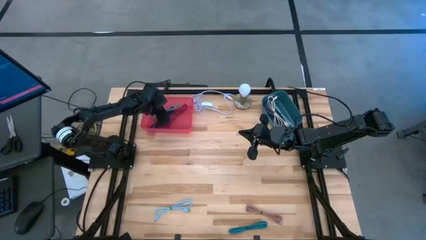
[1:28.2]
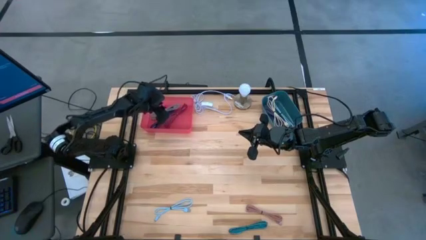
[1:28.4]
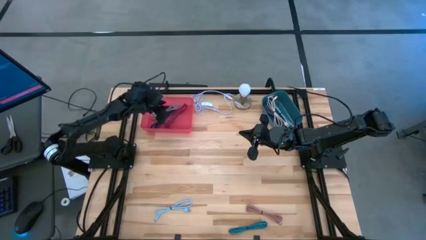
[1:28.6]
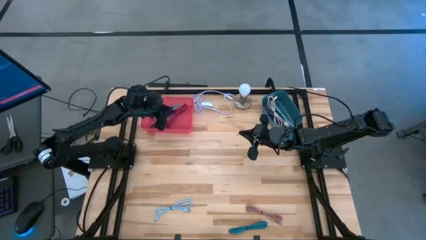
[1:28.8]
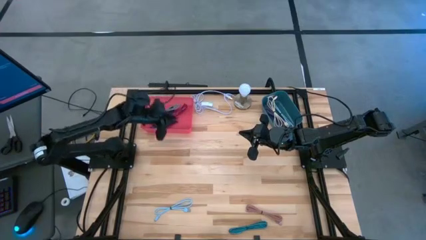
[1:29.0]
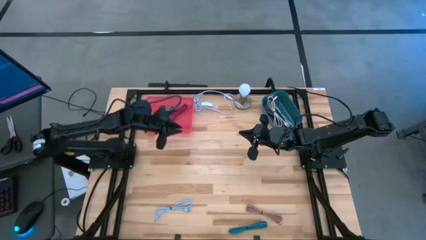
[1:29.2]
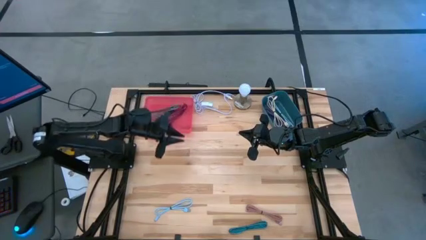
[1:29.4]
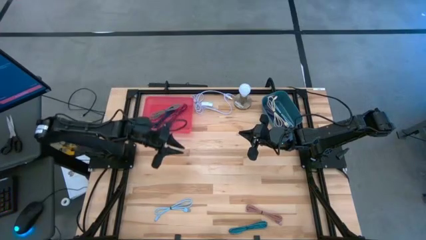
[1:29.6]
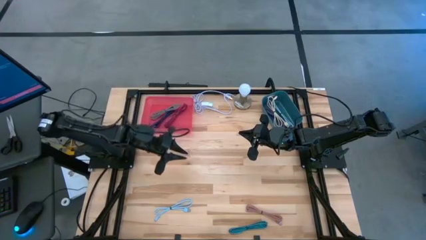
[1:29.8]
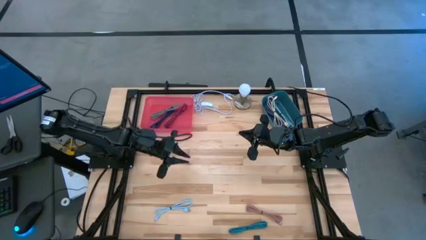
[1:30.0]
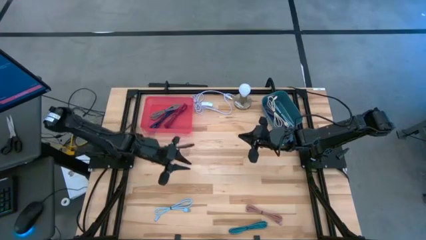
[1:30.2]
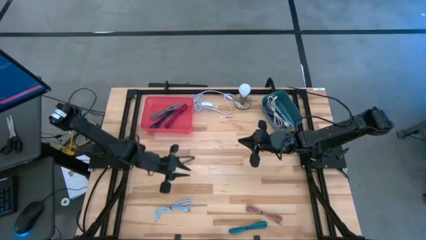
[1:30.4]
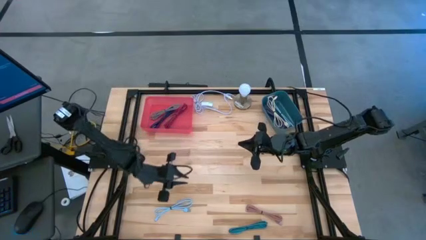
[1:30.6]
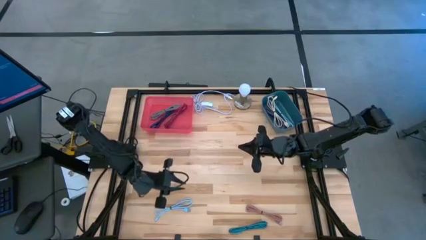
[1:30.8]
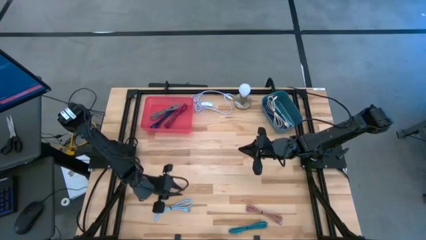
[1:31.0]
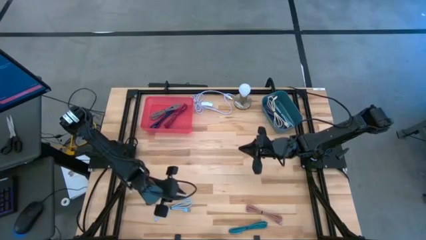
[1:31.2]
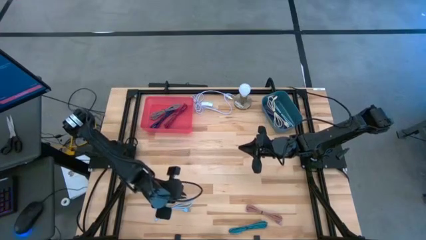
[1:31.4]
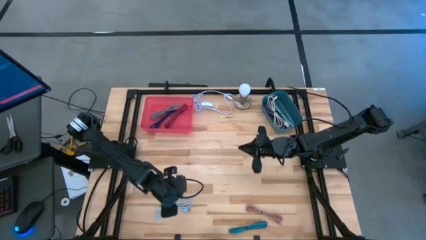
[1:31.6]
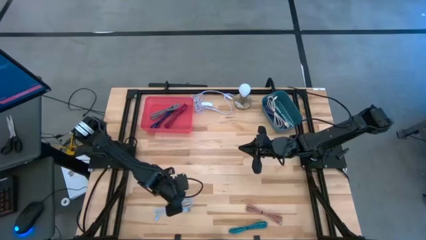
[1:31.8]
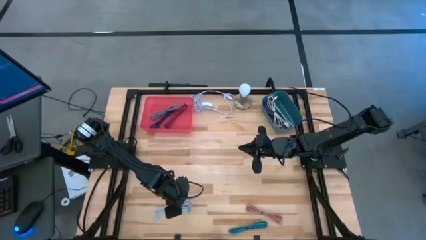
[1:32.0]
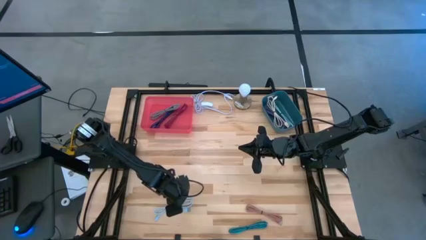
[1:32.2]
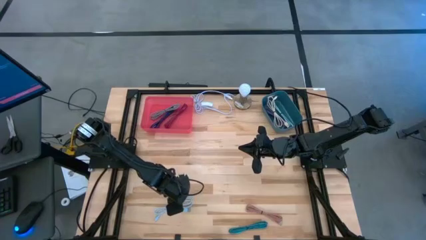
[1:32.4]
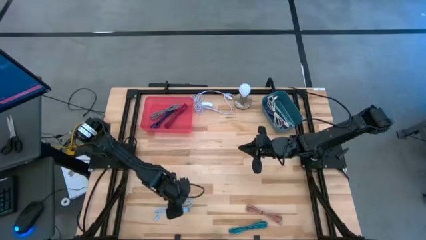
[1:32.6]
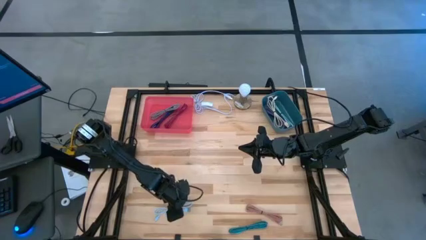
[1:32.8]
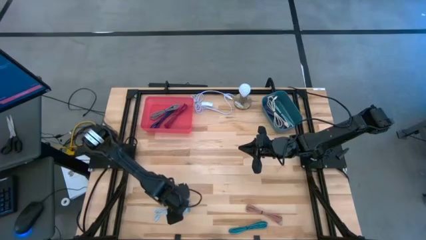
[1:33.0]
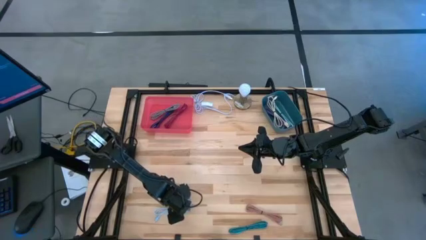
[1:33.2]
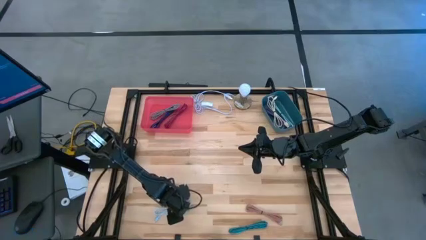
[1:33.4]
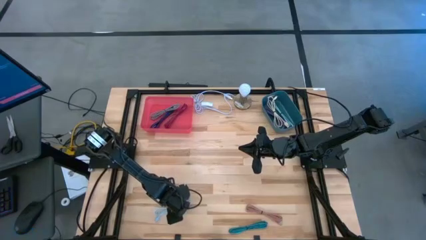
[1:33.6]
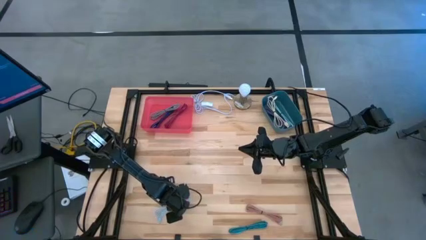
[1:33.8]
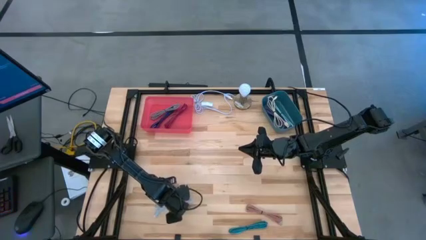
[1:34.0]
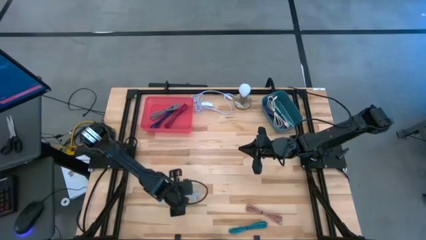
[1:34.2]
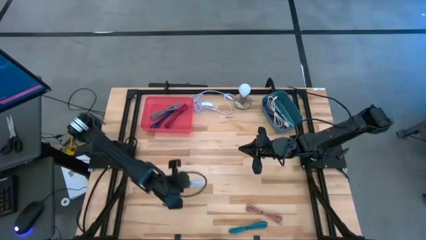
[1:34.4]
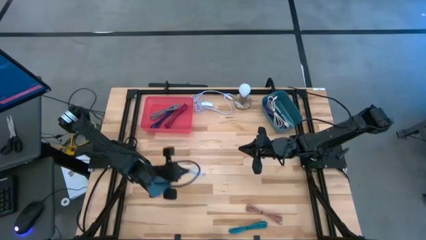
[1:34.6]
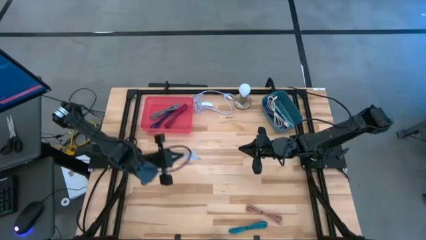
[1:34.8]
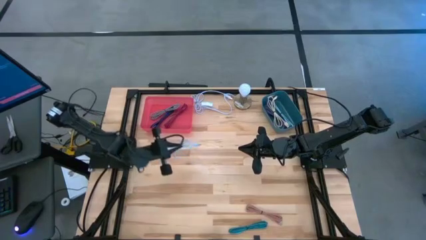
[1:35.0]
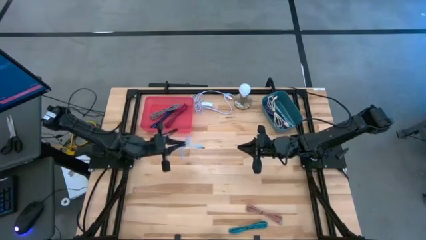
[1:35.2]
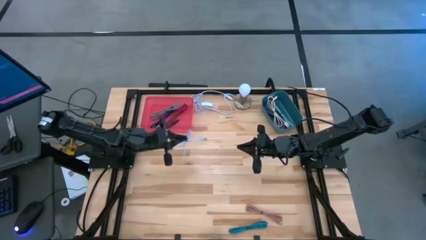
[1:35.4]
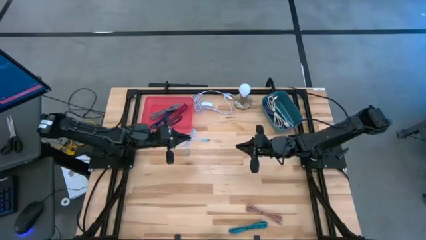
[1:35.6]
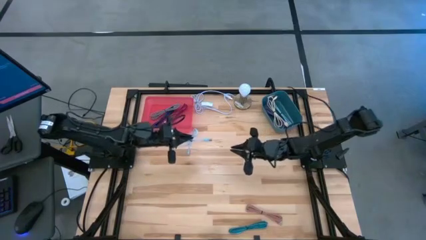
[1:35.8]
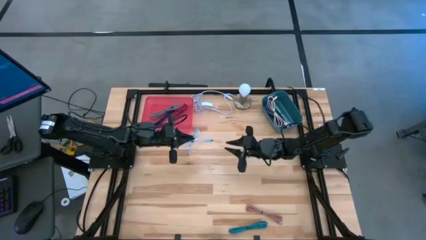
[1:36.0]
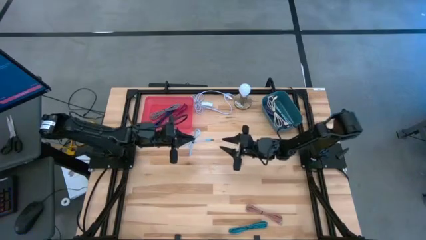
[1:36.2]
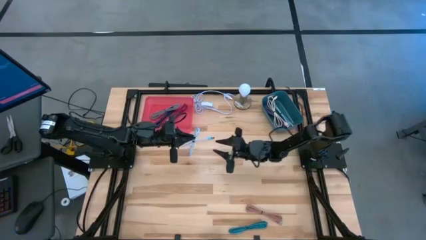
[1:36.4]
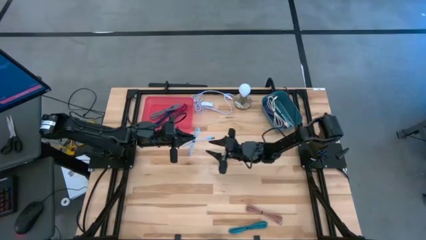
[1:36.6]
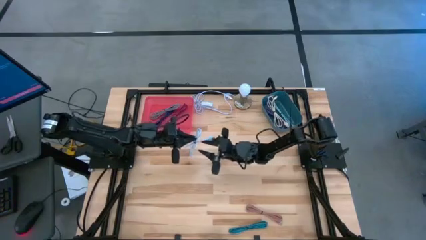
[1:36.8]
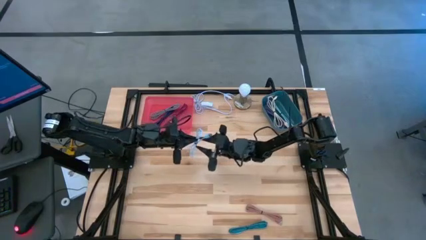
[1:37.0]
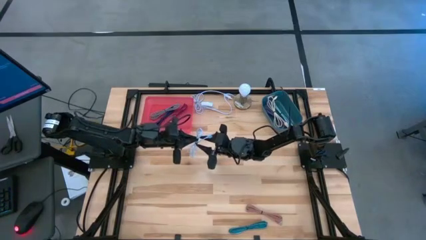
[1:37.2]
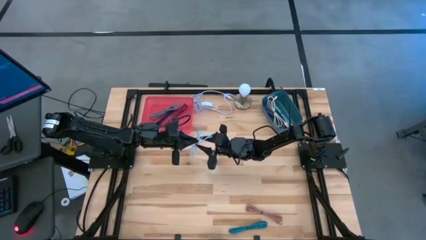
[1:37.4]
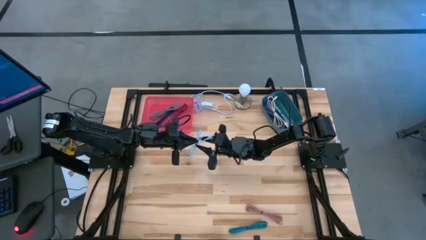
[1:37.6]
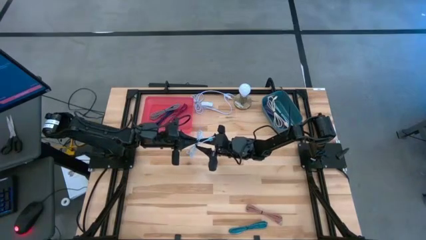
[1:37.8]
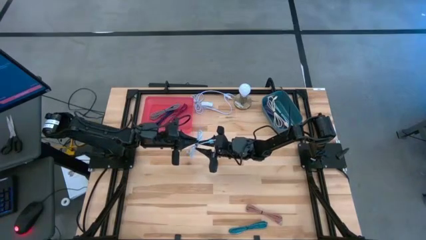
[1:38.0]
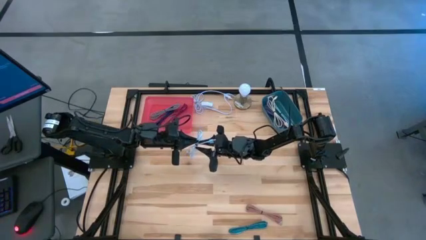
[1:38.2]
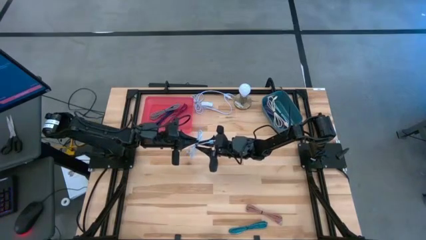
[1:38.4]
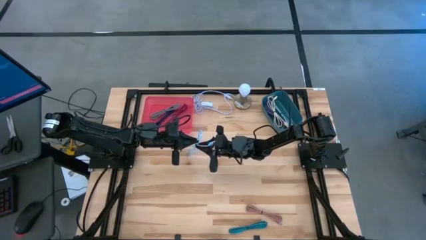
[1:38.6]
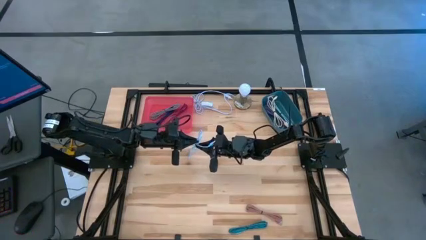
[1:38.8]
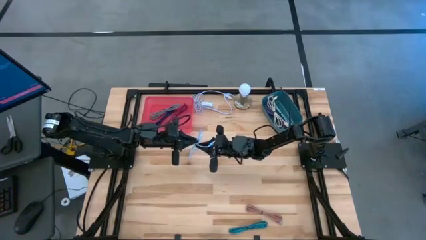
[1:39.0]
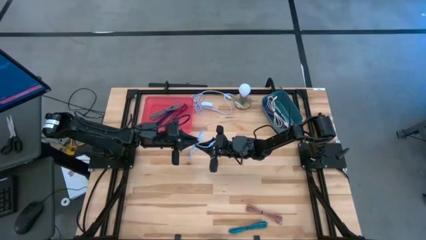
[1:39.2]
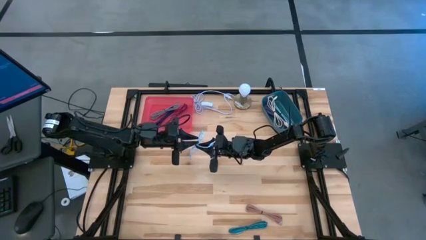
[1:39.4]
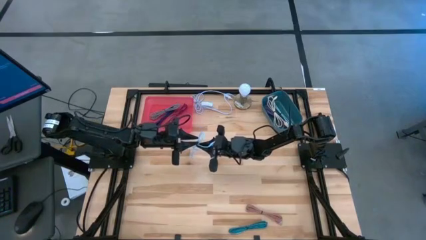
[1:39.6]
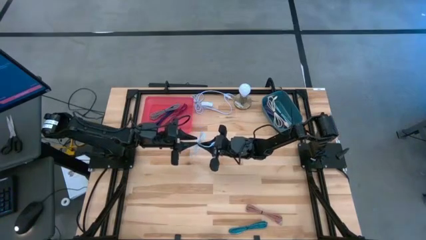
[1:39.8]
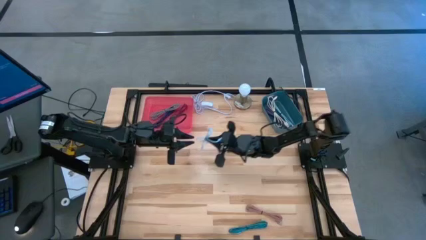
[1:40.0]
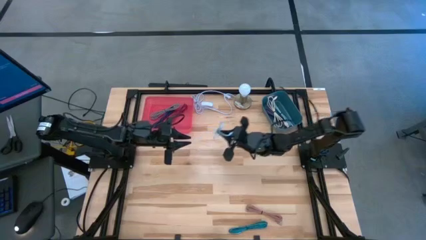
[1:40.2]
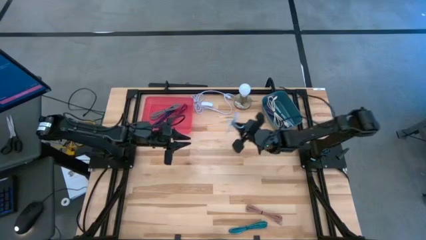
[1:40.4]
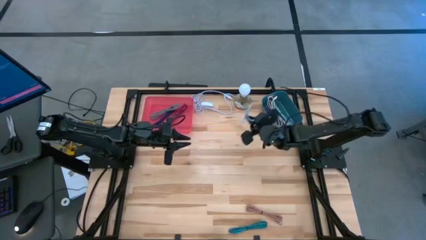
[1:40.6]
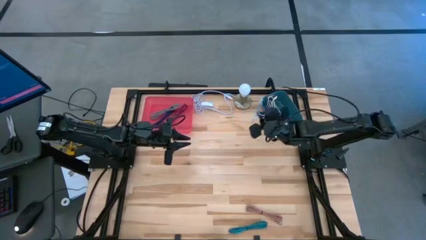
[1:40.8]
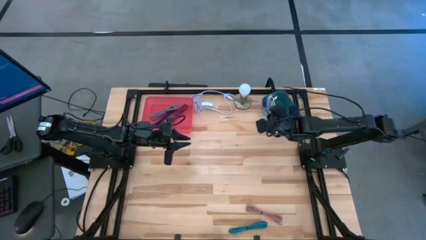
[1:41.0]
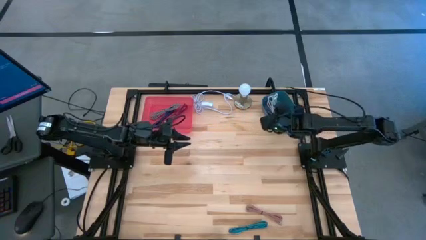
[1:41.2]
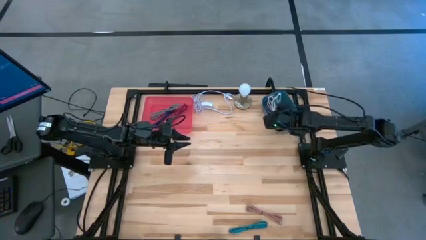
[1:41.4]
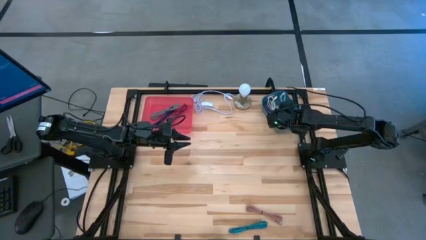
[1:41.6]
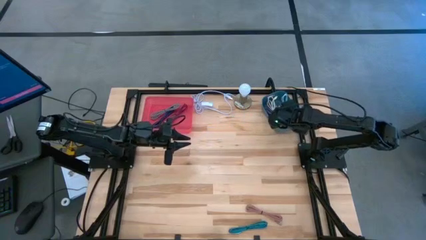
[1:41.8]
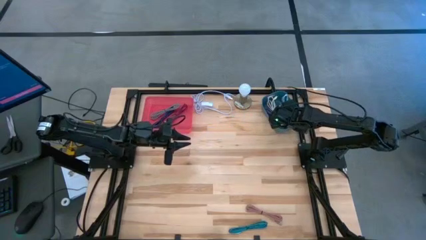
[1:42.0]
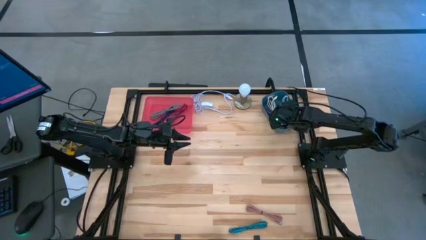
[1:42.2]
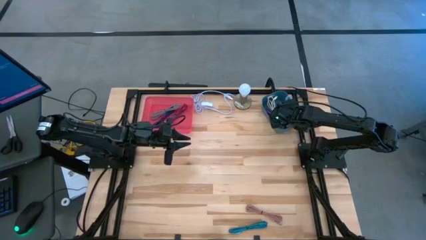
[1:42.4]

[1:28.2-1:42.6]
Task: Pick & Place USB Port
Put the light blue charger cable into the blue bin

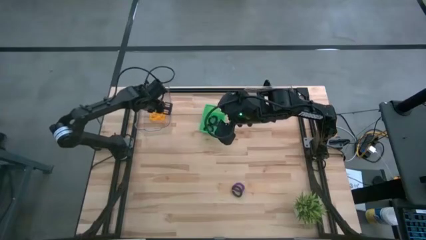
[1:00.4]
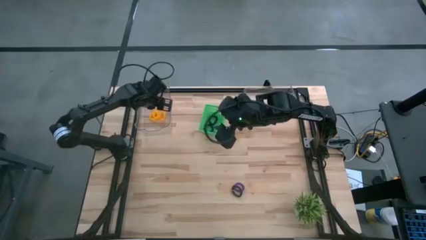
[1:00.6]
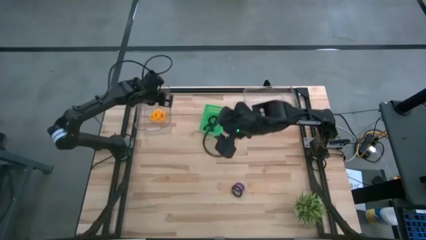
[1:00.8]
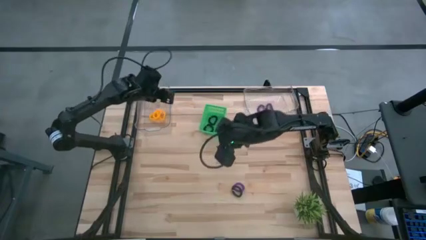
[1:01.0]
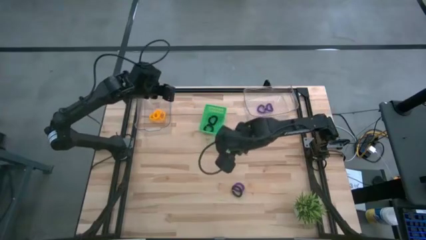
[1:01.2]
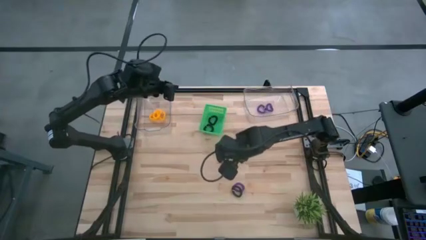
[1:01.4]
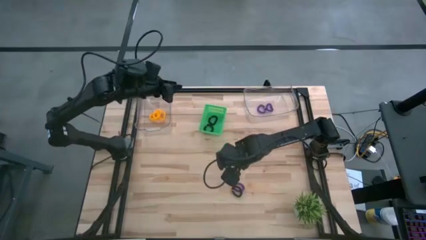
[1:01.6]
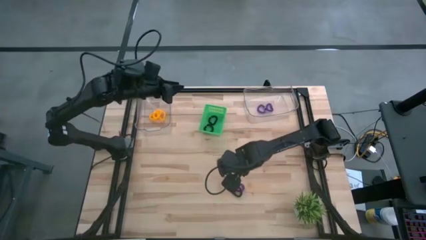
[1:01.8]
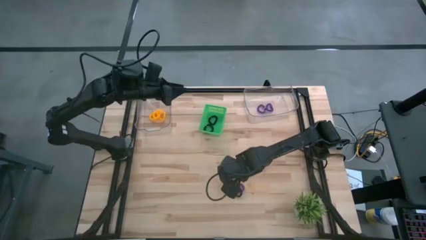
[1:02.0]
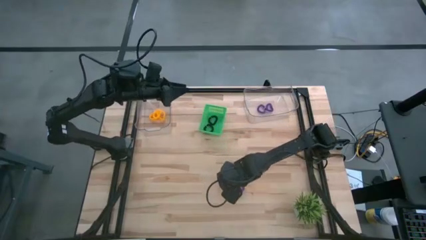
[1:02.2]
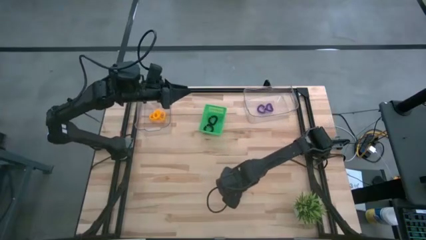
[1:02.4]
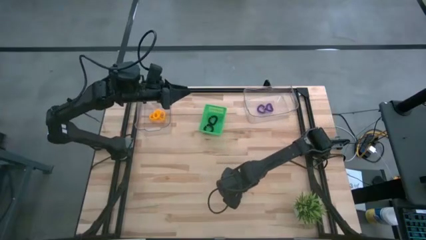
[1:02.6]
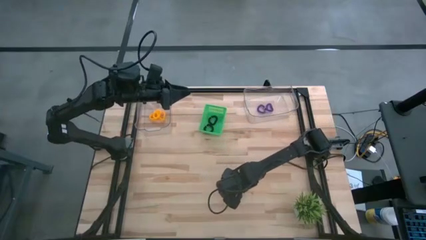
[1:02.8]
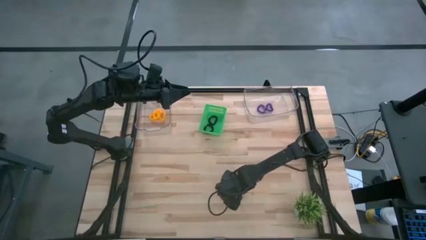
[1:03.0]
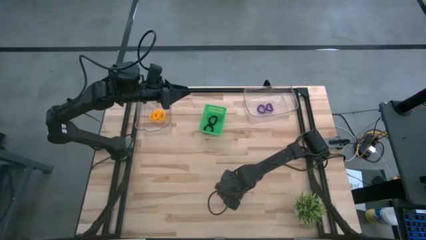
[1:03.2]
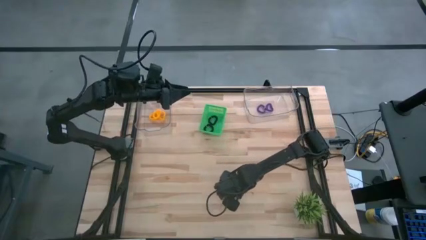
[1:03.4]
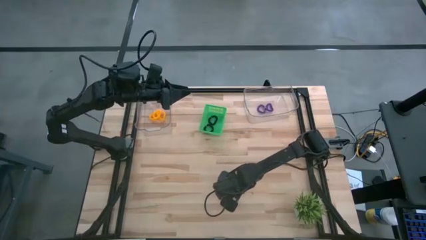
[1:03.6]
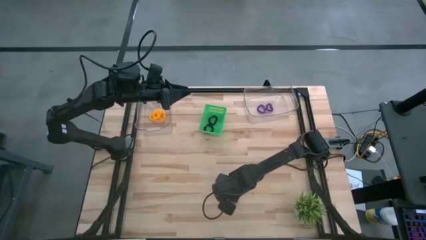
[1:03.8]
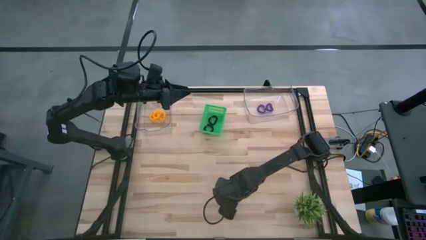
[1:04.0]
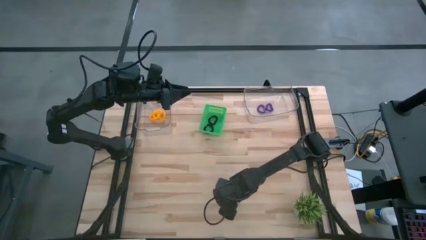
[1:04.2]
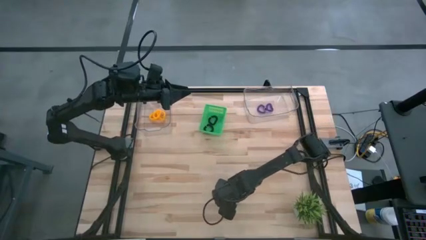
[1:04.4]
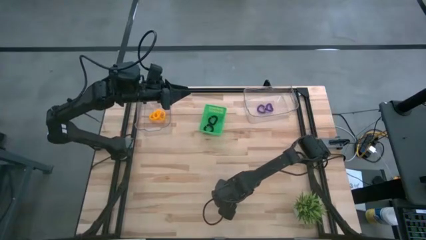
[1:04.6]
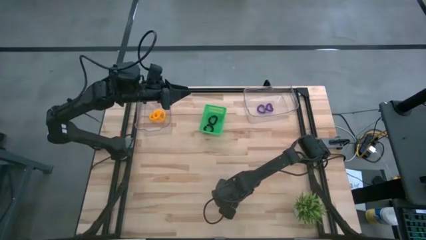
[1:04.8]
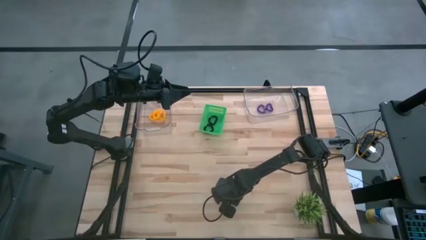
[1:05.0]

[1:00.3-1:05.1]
Task: Sort spring keychains
Put the black spring keychain into the green bin
